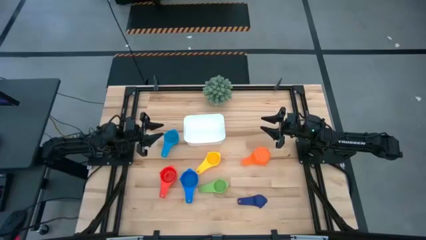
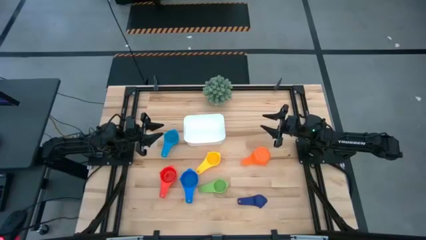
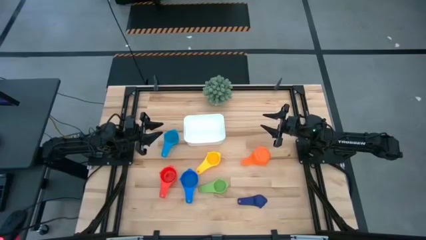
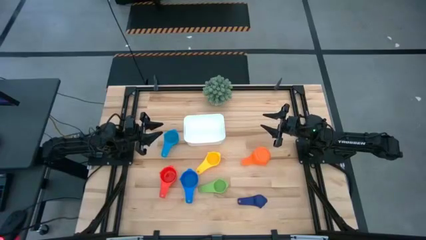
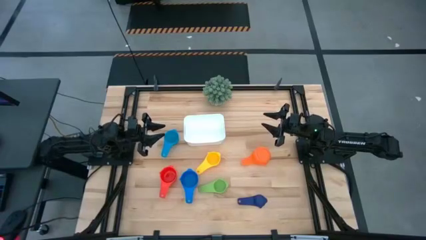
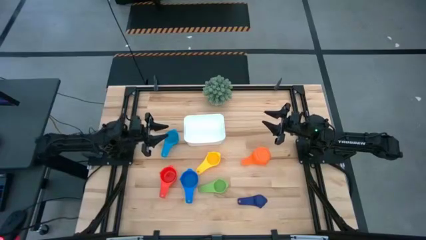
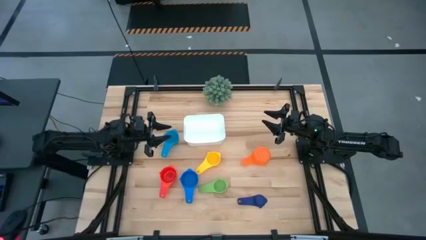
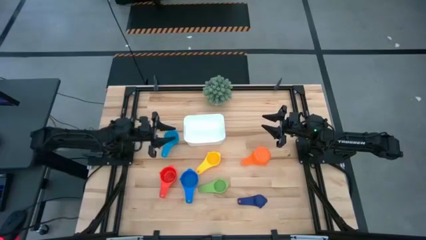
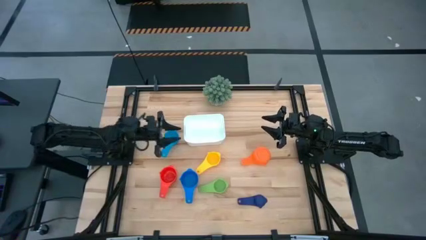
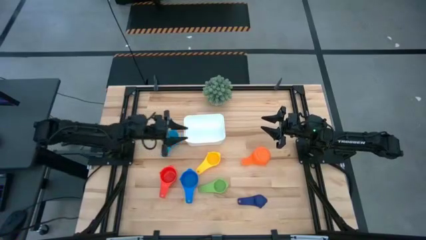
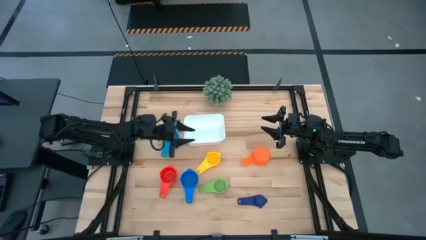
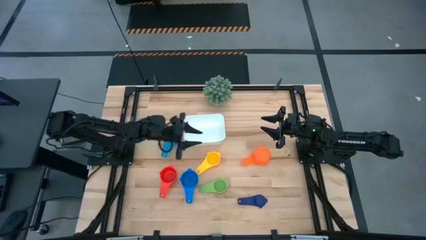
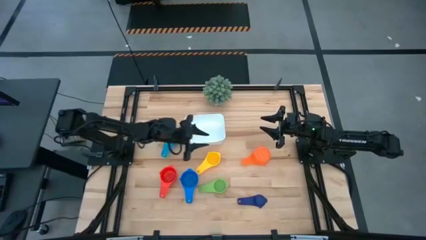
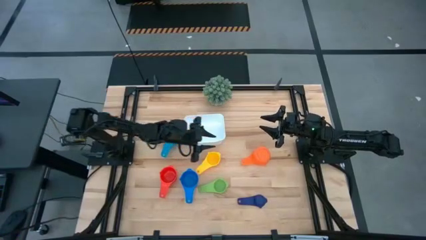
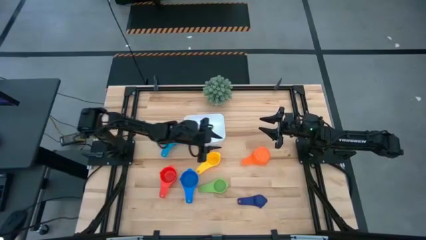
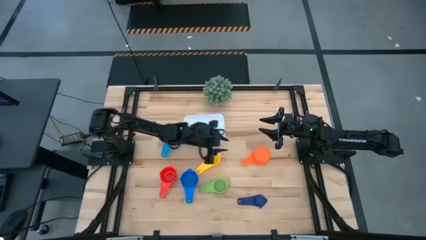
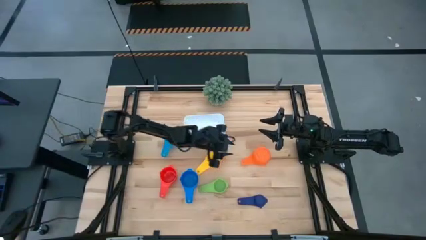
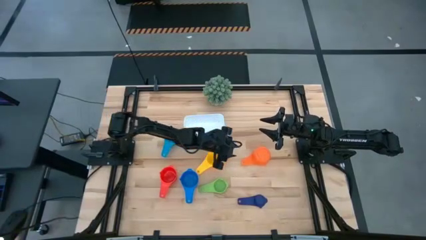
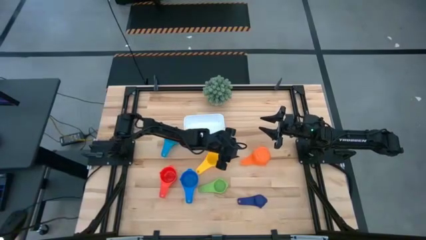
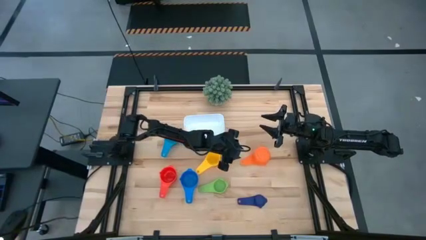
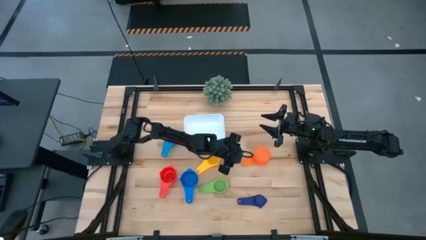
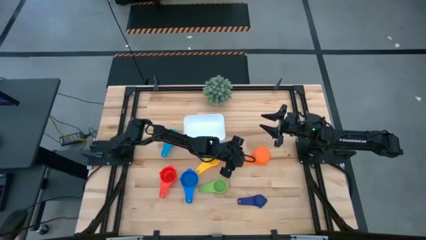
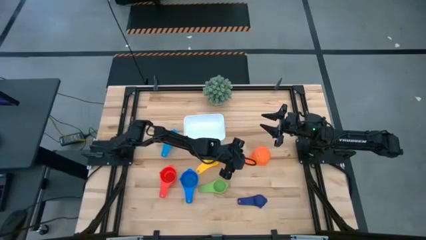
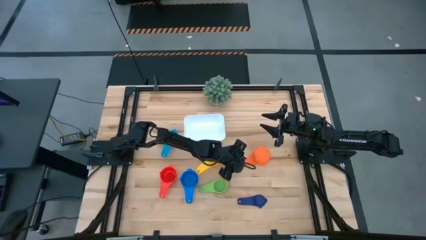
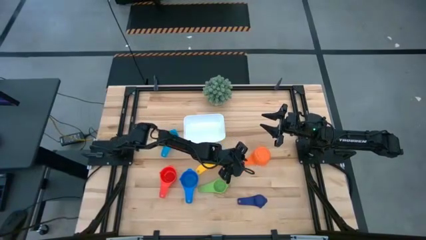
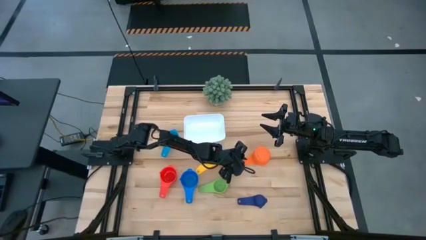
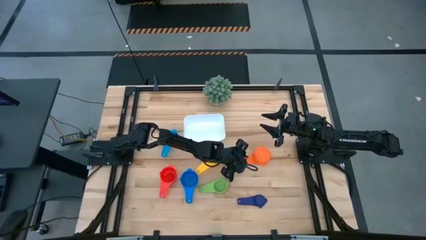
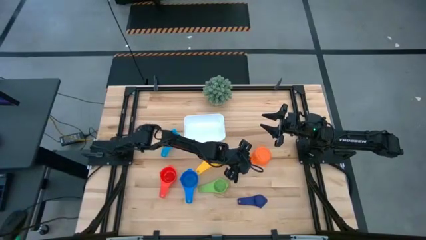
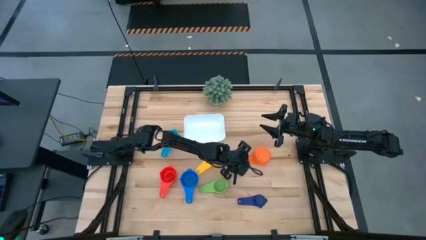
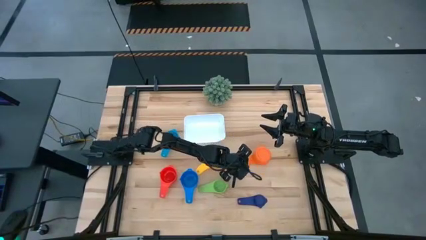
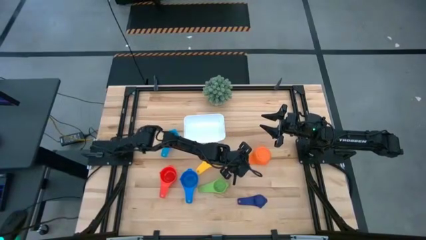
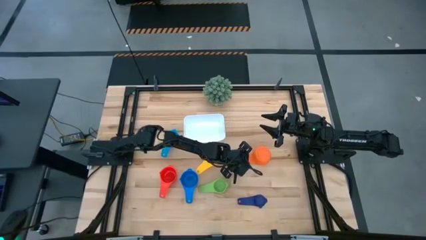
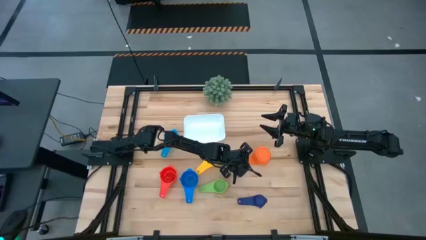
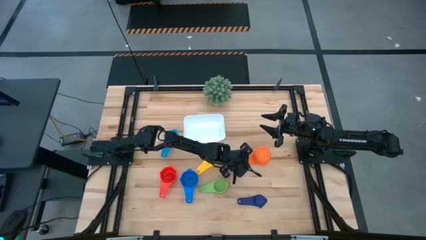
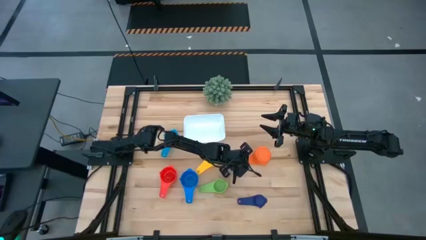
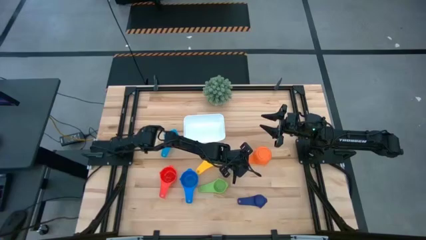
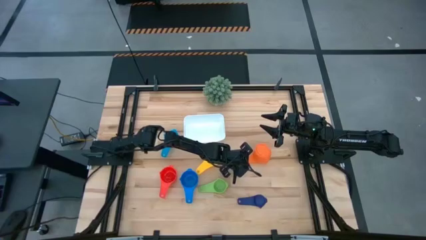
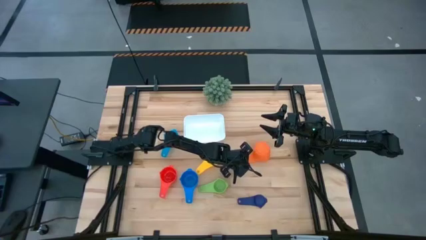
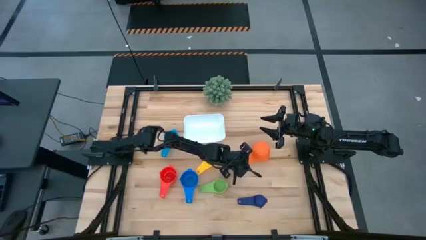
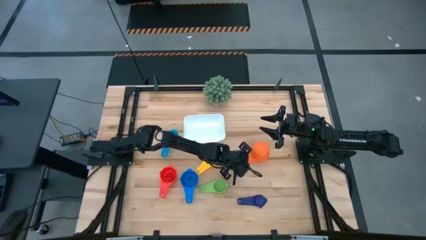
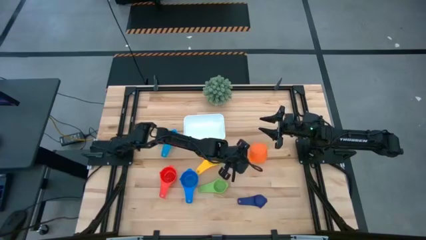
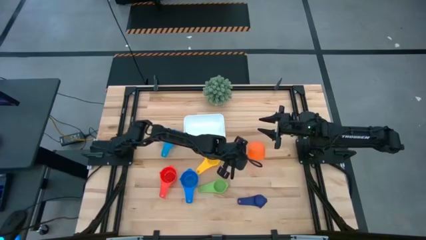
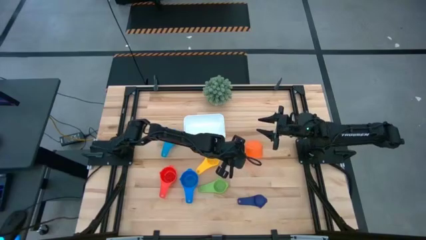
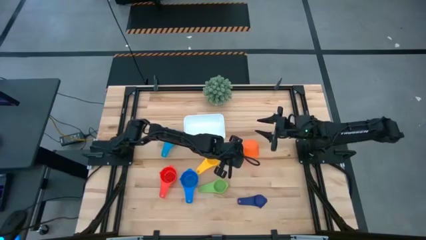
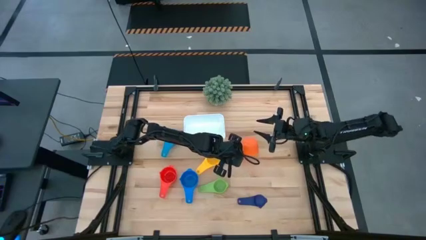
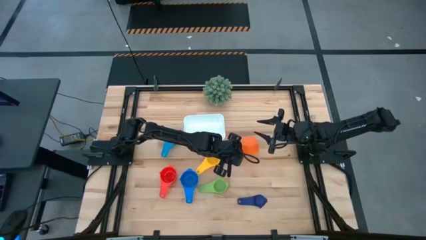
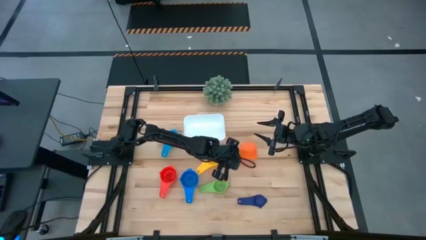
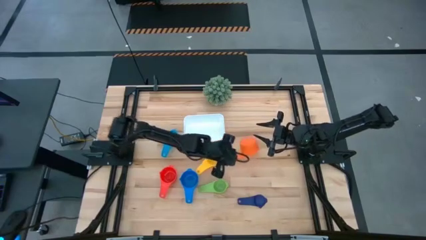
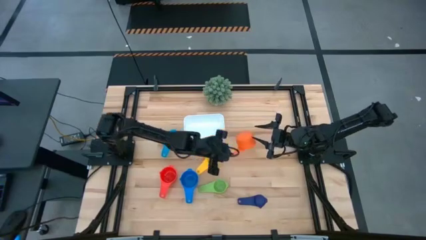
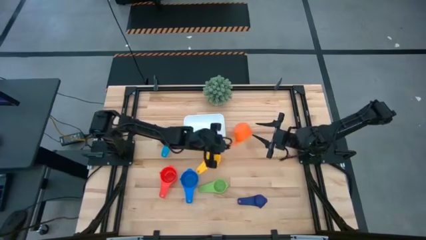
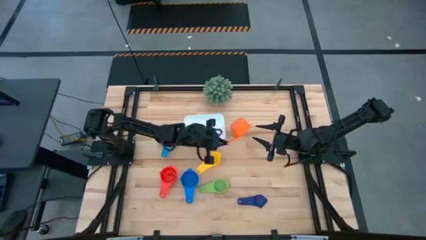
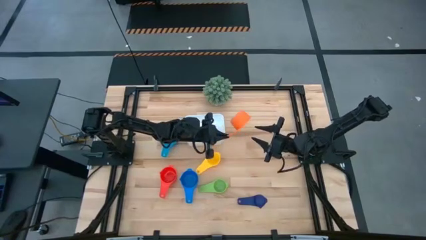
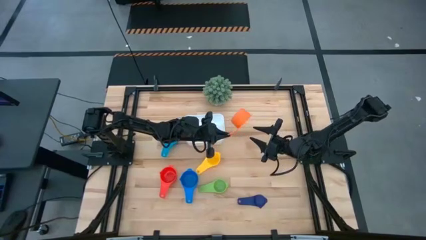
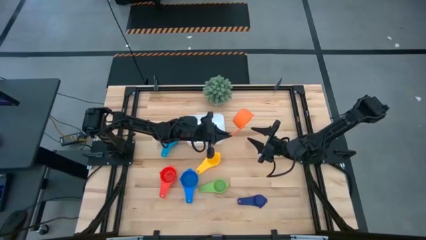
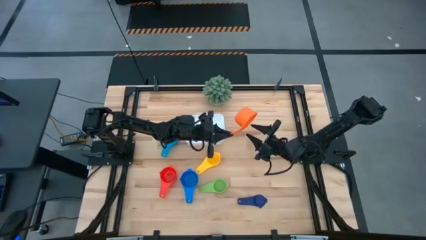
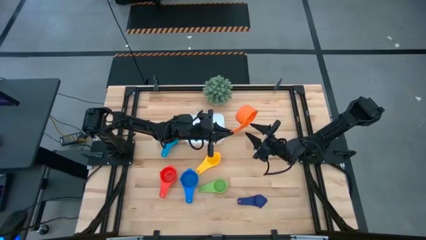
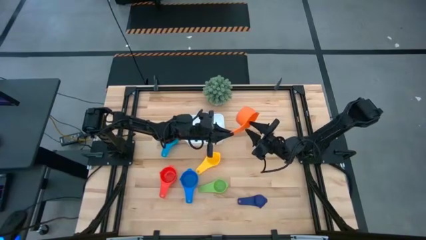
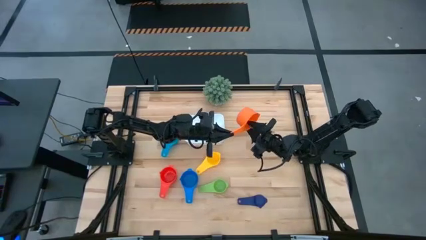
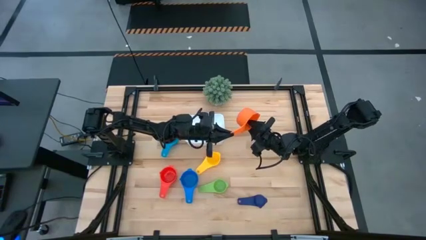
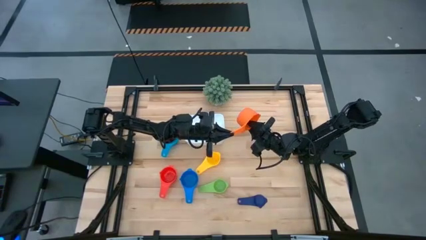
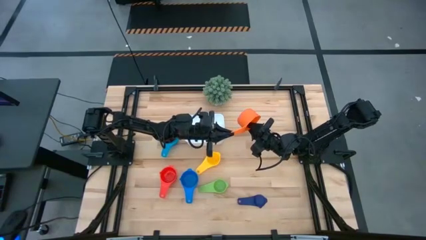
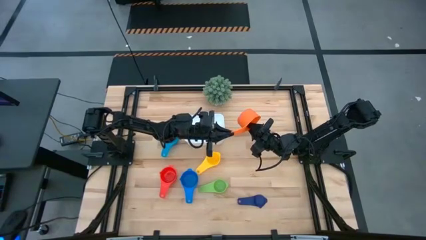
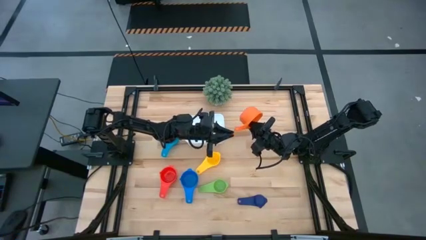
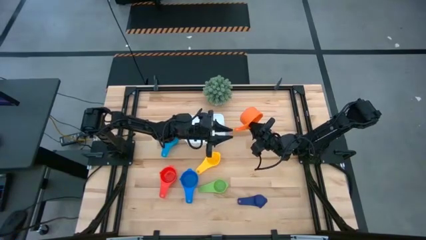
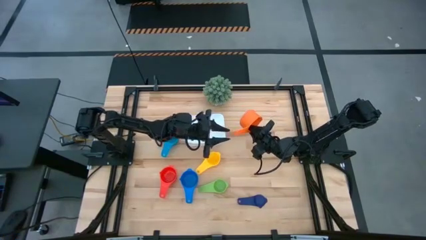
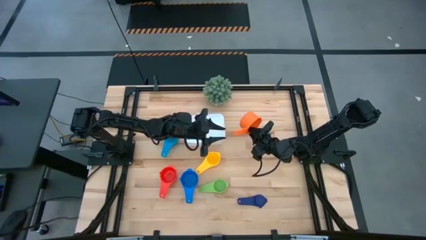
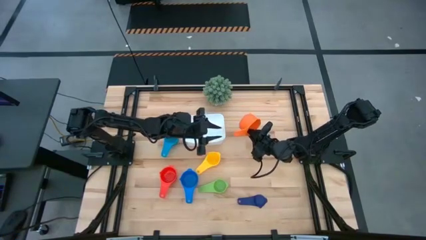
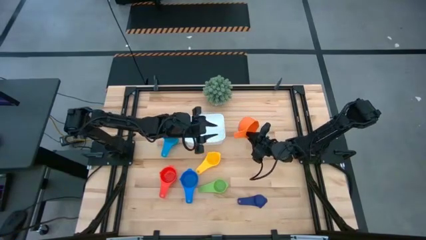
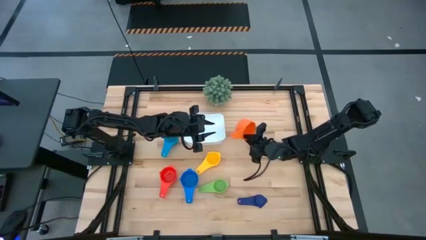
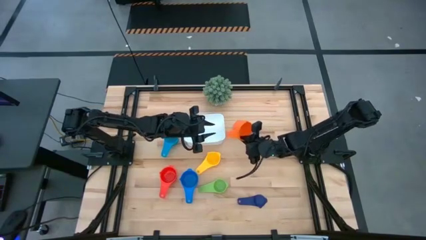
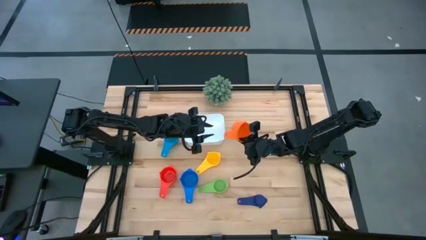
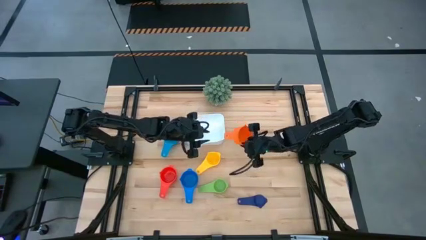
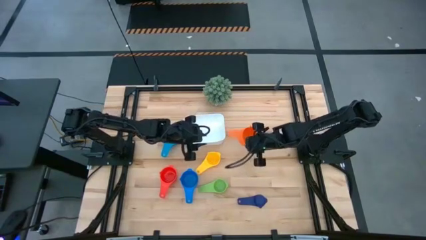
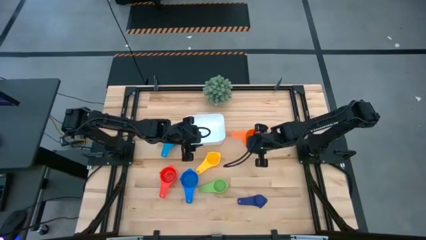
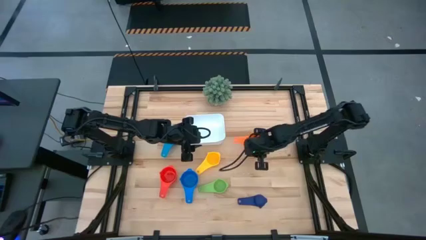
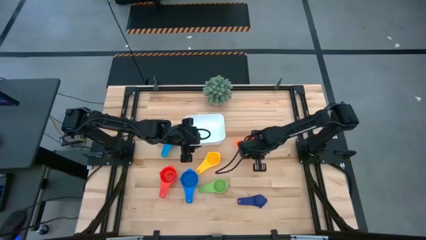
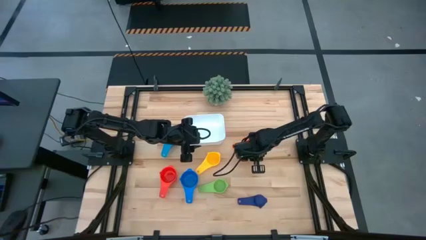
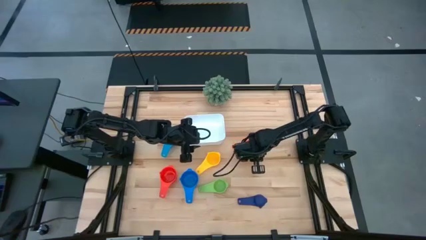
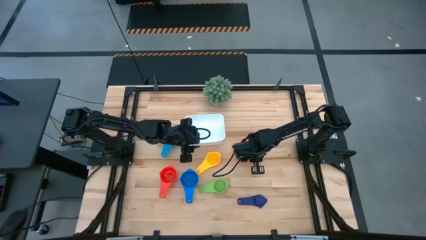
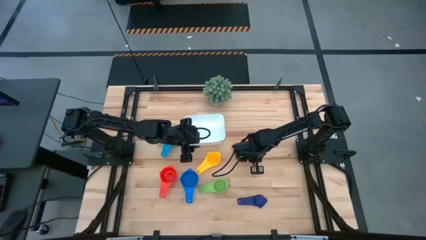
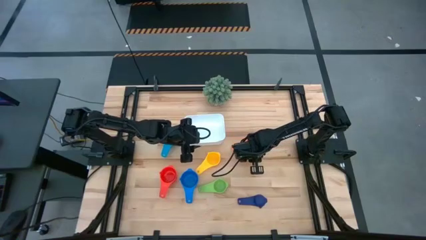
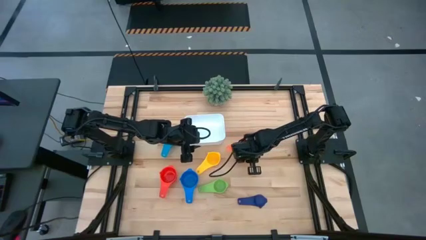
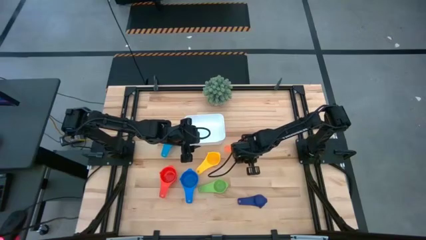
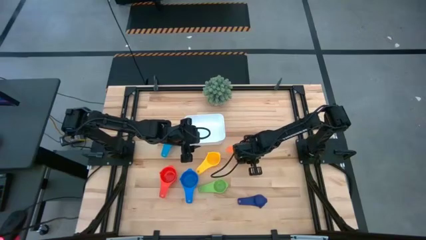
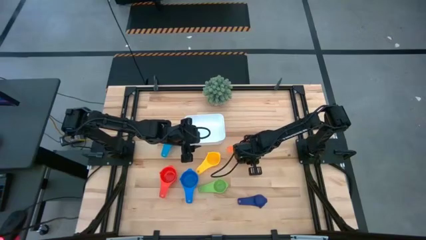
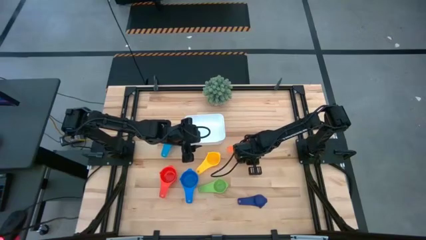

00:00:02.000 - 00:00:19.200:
Task: Nest measuring cups in basket
Adjust the orange nesting cup
